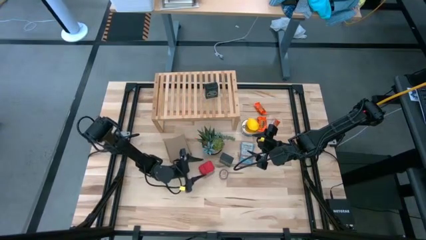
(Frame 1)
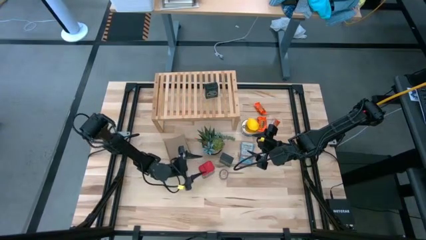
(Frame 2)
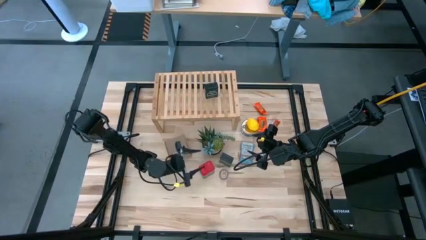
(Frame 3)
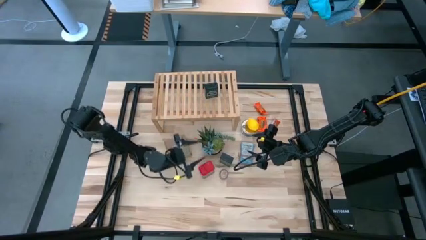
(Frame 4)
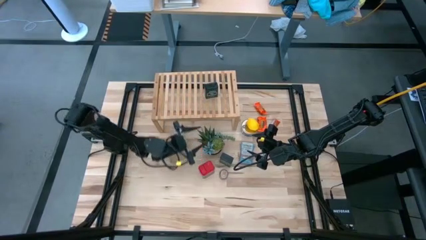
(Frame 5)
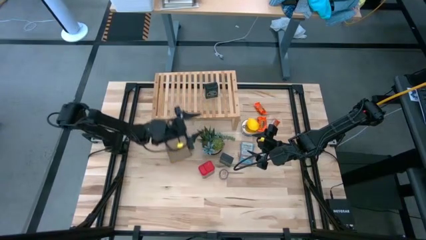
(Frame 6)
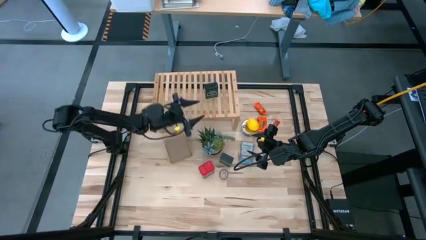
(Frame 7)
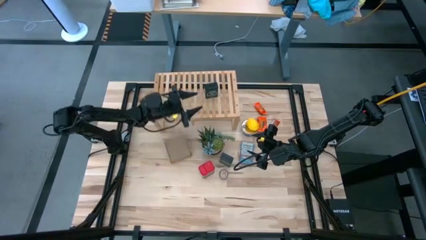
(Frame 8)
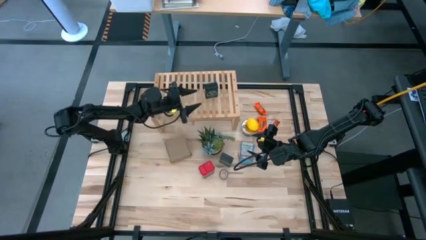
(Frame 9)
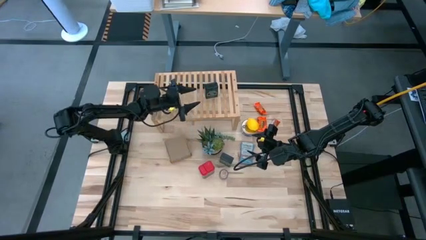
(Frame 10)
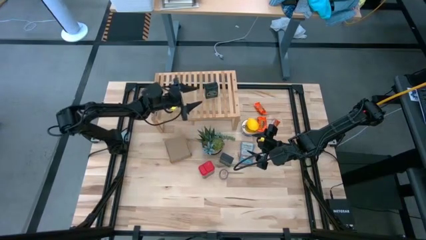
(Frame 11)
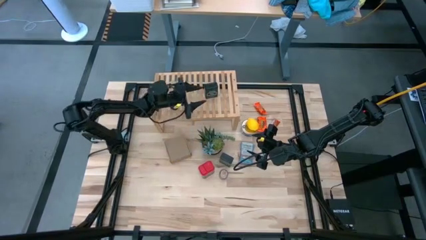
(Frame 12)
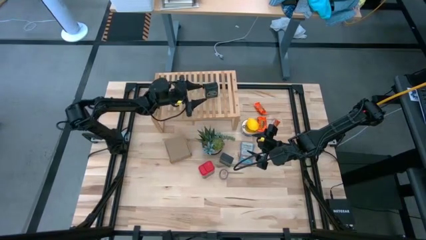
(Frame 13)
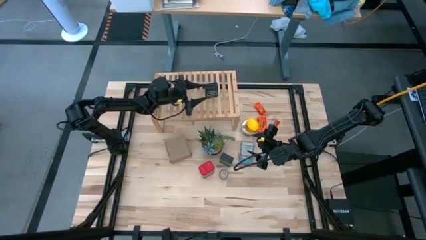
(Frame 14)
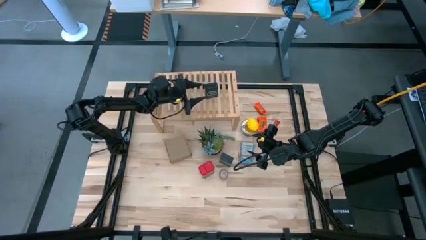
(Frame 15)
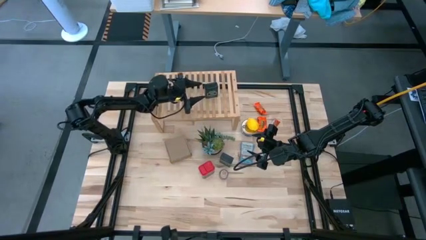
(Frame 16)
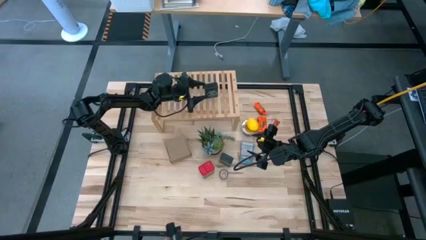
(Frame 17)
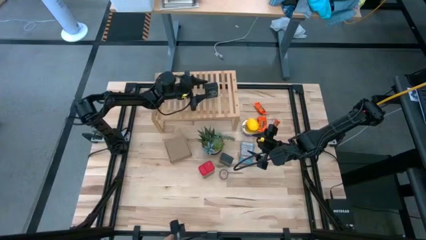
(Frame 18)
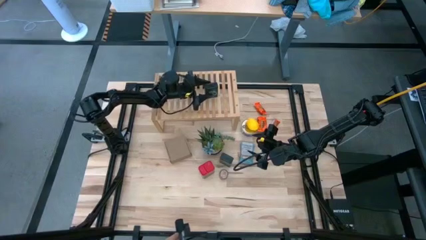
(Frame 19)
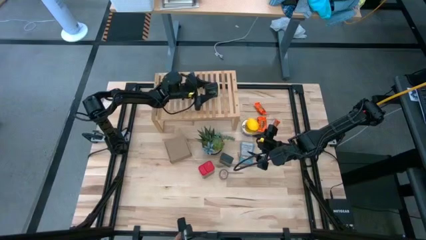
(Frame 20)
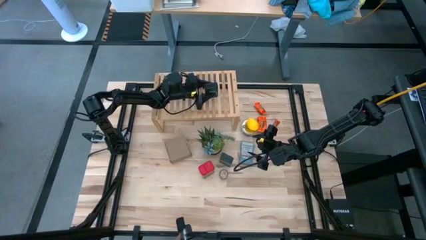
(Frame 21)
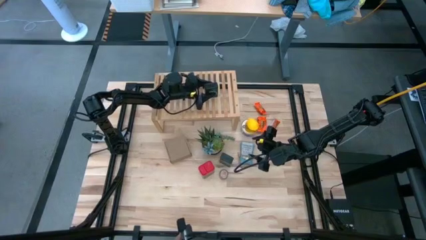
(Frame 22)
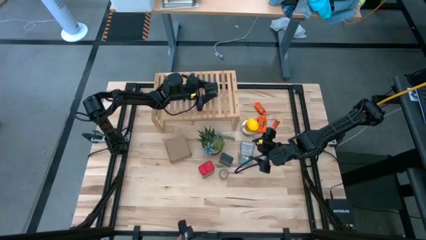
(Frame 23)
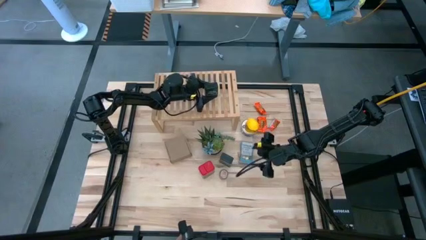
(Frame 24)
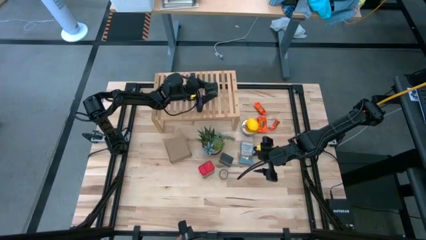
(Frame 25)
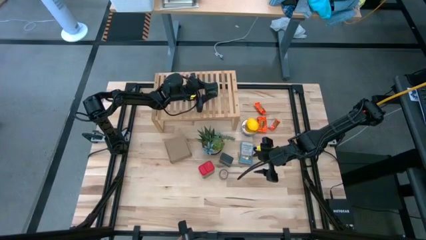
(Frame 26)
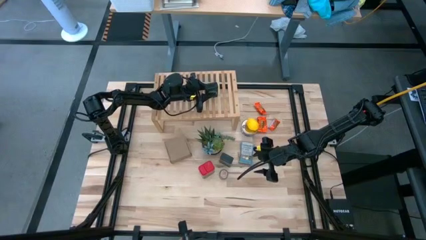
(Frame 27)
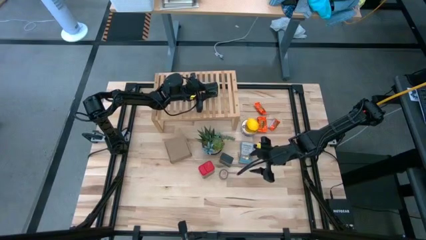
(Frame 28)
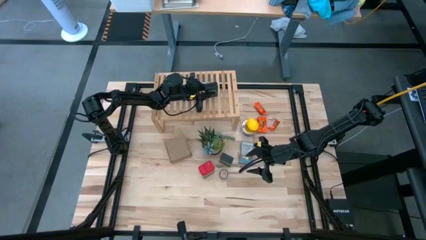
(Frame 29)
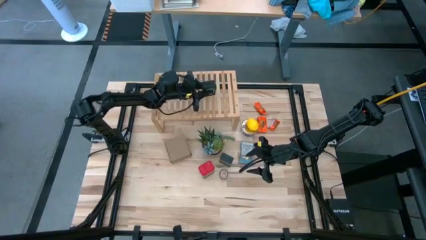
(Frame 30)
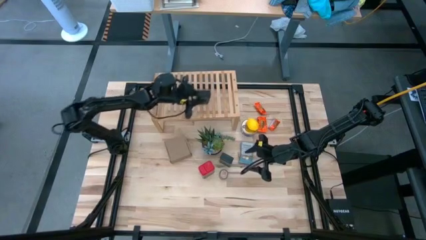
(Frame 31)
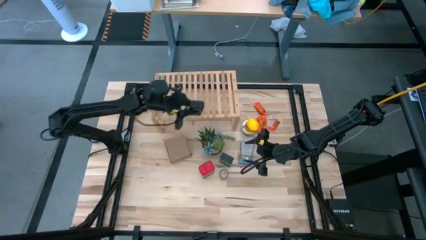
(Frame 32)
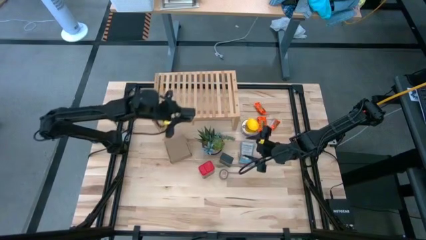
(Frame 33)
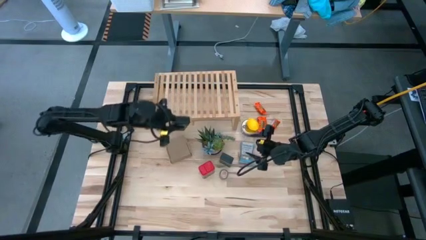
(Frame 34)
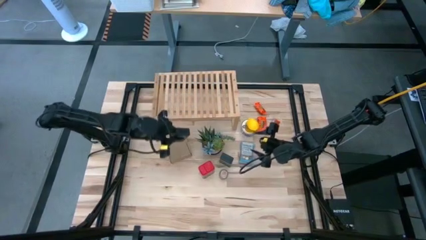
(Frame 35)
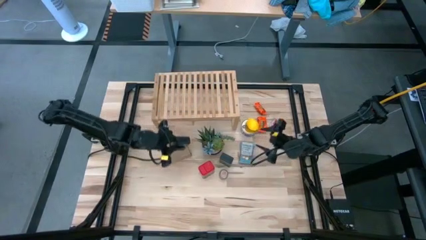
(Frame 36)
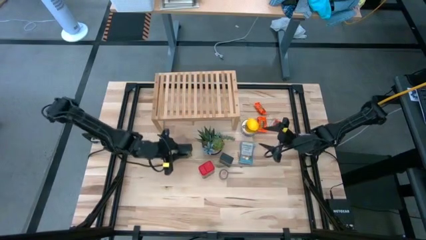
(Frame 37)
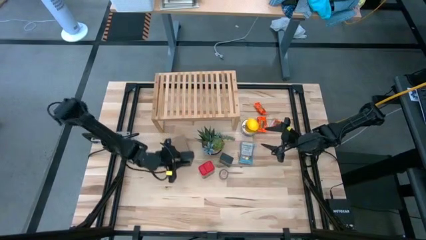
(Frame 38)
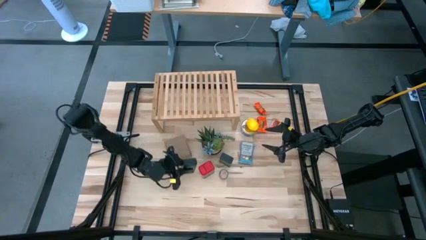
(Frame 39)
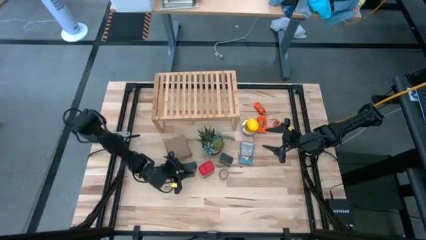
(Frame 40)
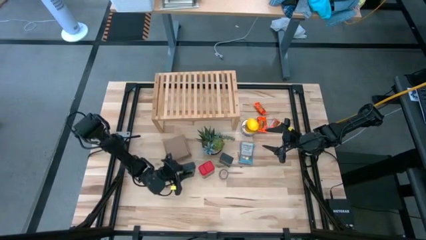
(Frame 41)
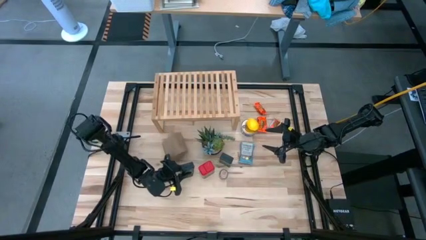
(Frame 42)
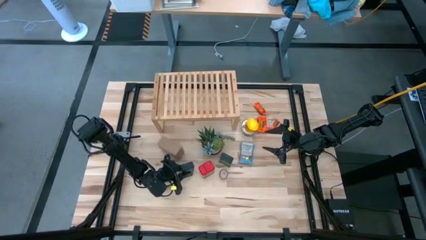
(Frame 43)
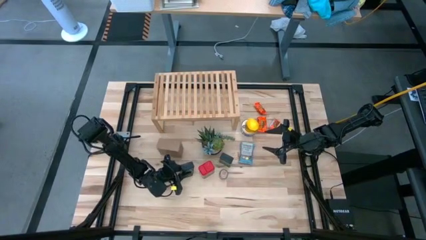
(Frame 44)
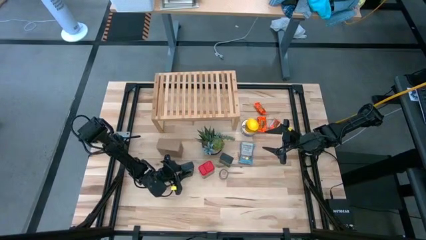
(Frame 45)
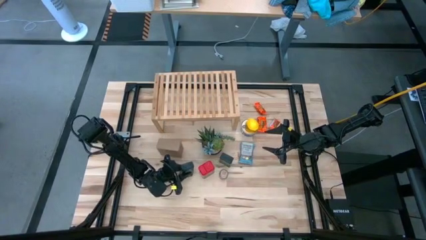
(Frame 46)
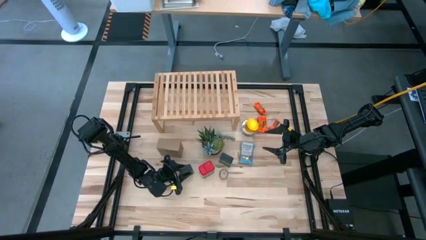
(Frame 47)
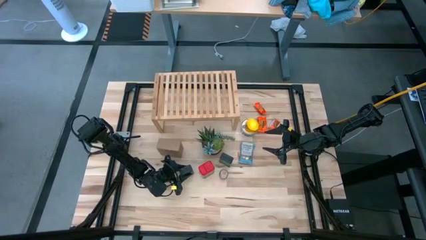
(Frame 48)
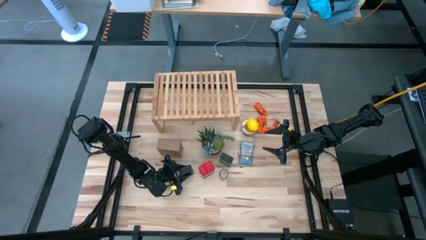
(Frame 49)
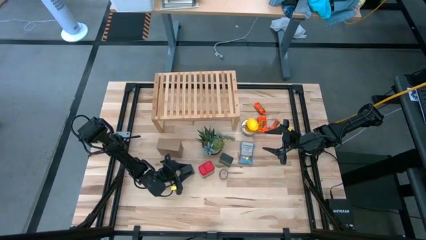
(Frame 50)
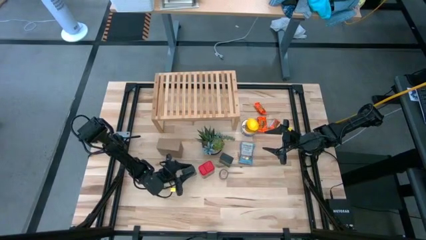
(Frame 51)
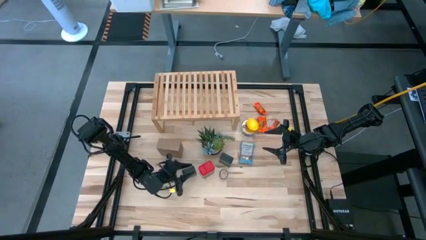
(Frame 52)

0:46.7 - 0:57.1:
Task: Shelf spices
Remove the green seasoning can from the shelf

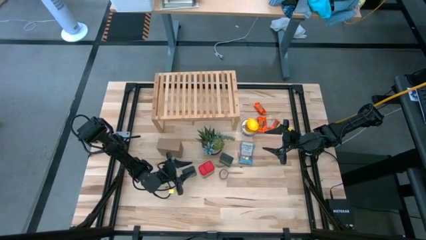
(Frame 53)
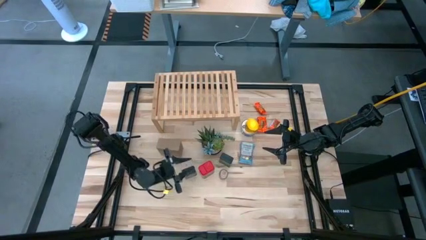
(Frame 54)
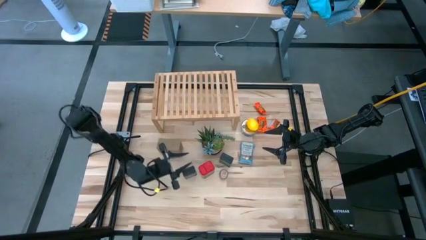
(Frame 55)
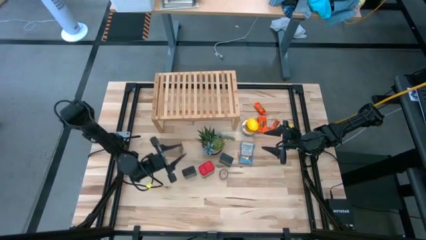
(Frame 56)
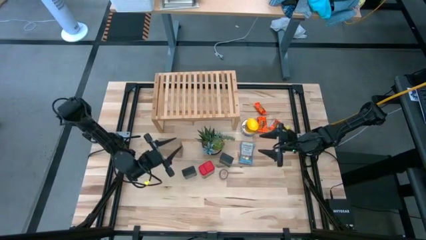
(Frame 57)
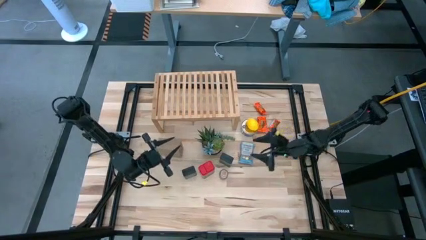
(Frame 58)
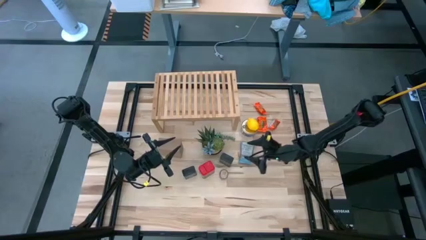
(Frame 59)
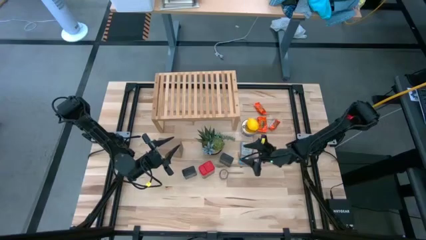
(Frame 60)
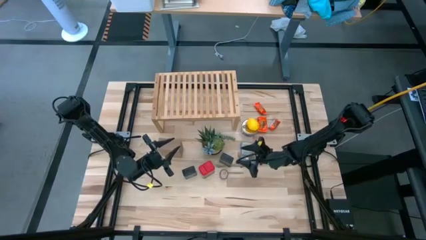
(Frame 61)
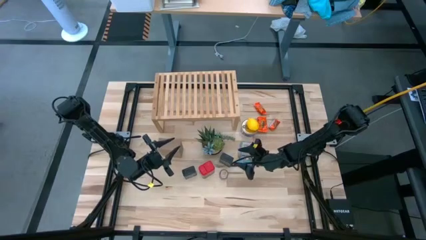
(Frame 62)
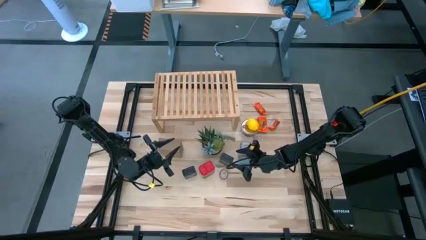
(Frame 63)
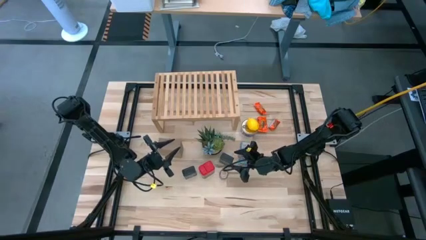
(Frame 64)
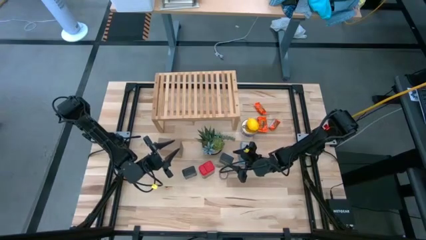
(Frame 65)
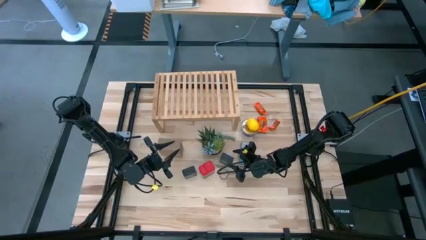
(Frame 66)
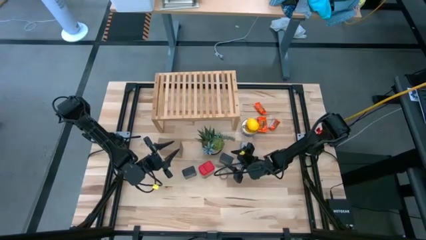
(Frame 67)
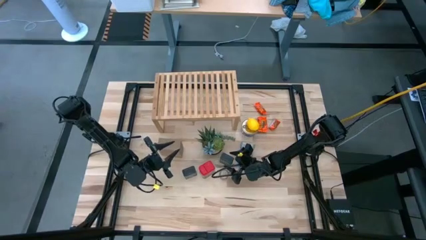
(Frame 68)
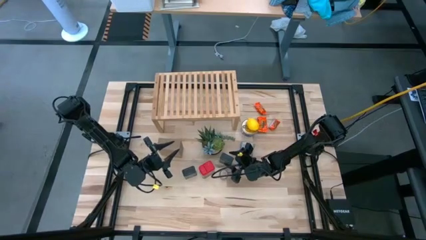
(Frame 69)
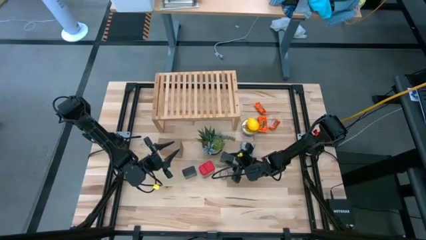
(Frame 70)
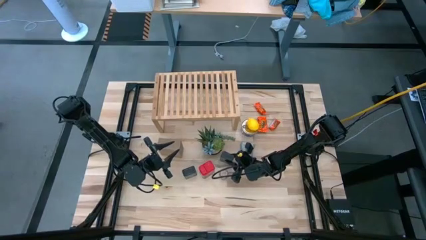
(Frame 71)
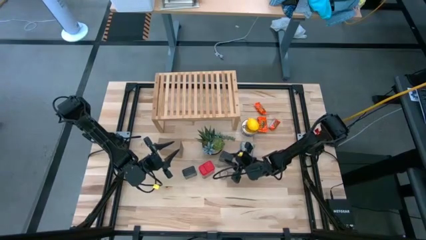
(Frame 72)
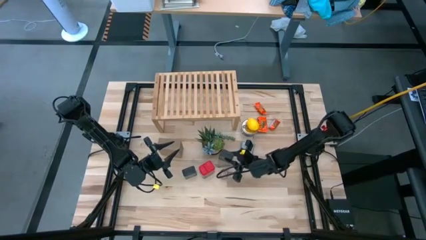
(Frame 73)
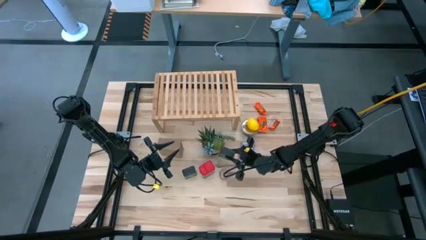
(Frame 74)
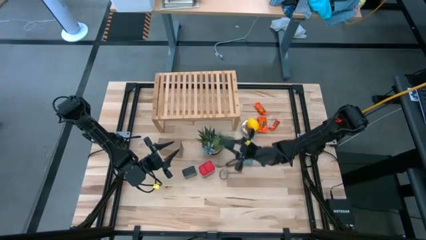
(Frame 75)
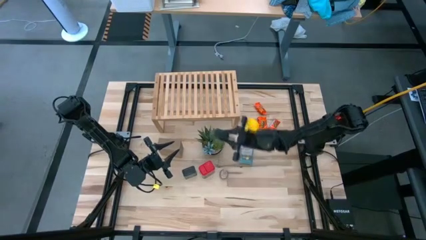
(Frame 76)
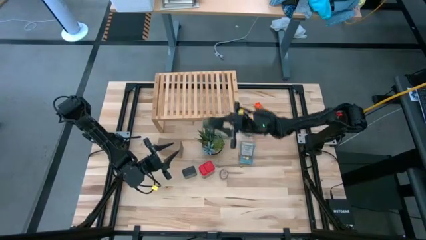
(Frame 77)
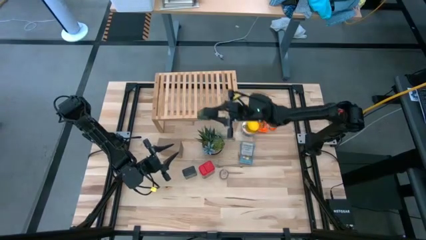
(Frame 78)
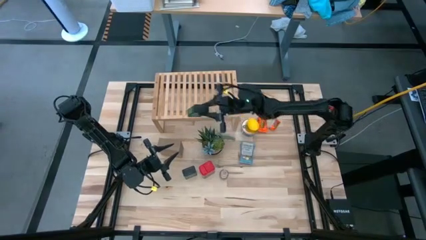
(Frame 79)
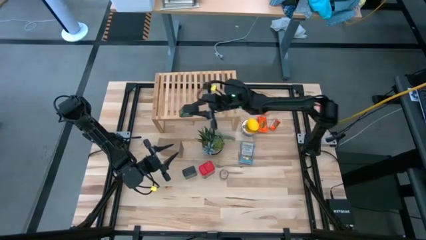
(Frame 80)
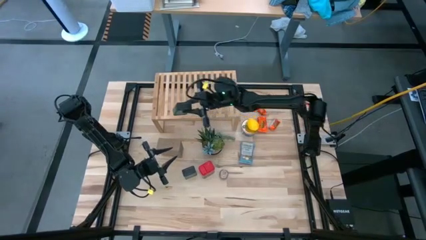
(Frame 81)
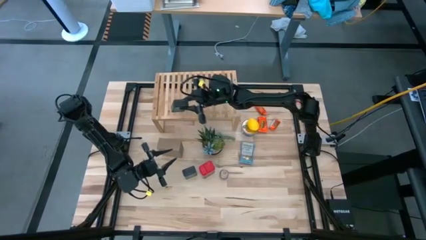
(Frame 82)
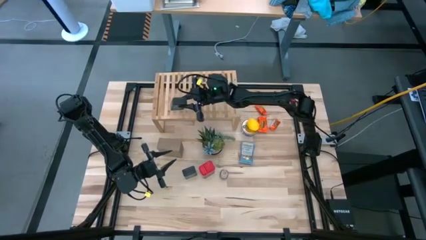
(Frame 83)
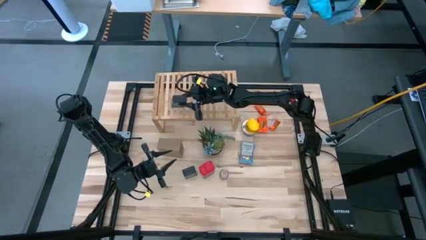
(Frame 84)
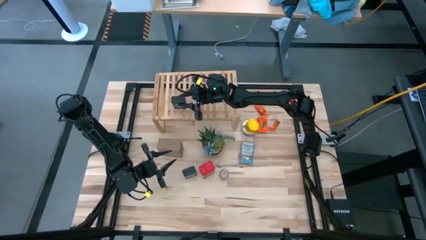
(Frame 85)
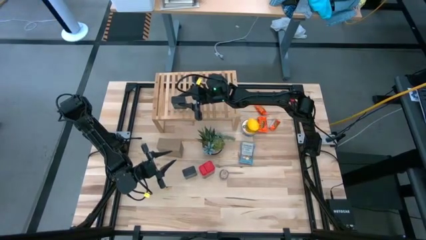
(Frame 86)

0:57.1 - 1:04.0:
Put the right green seasoning can on the shelf
